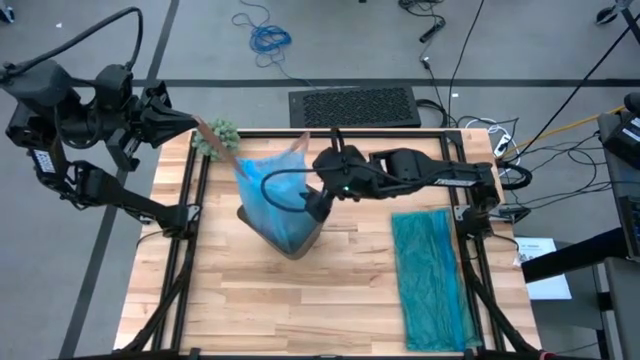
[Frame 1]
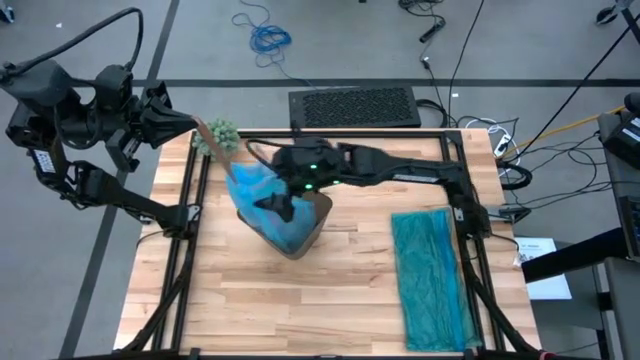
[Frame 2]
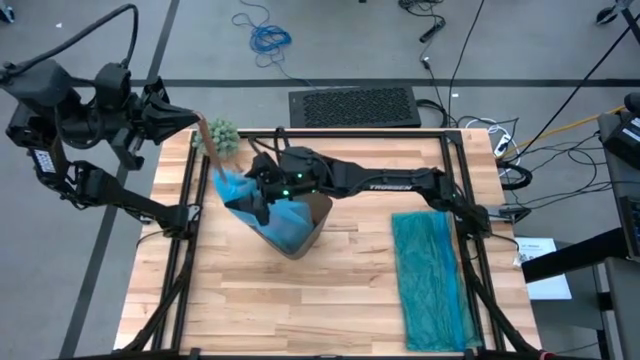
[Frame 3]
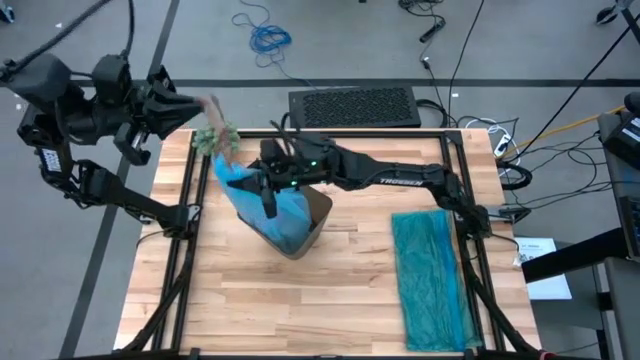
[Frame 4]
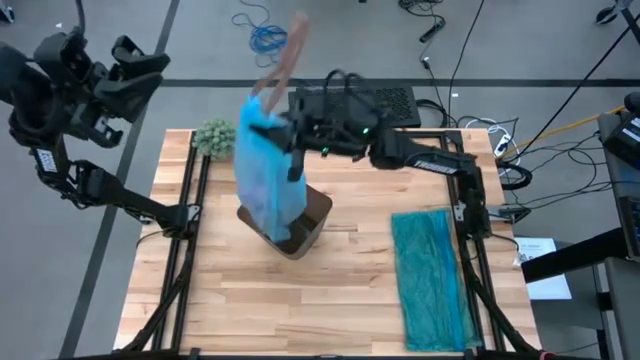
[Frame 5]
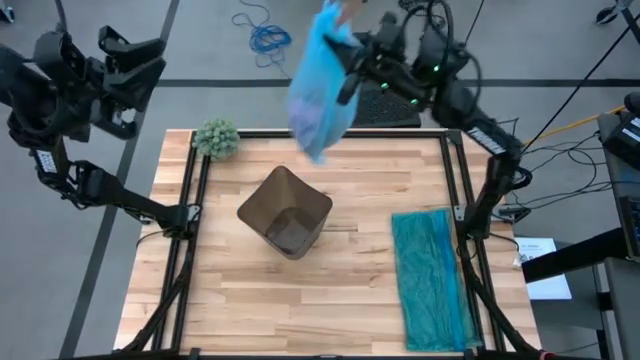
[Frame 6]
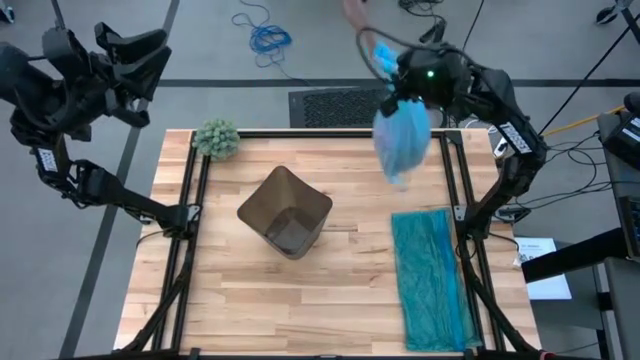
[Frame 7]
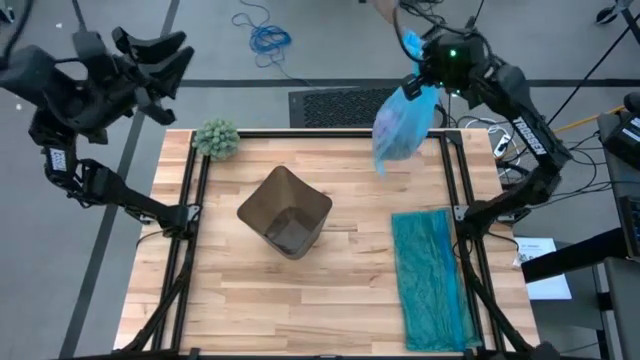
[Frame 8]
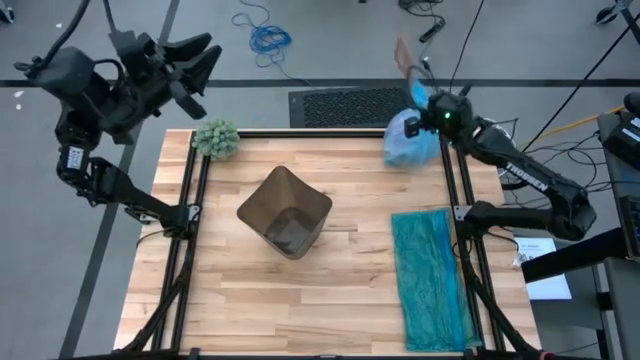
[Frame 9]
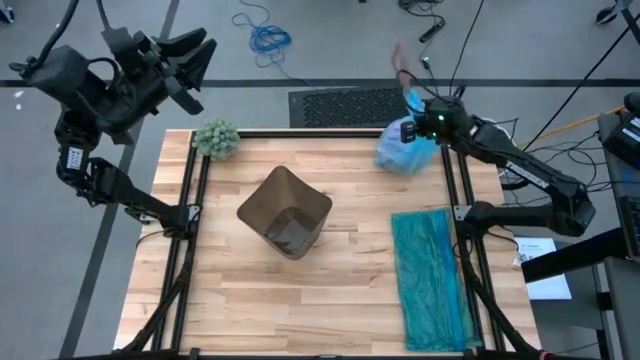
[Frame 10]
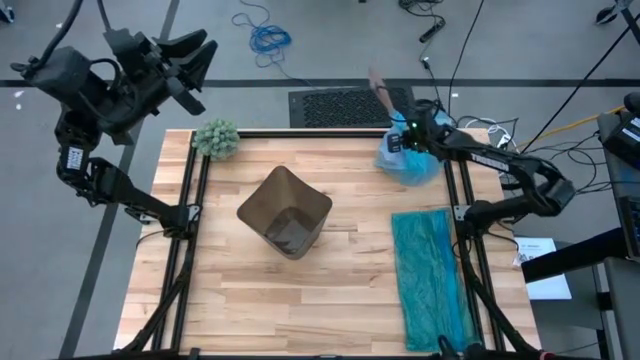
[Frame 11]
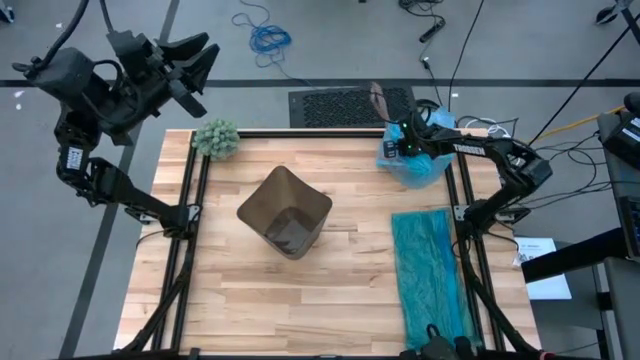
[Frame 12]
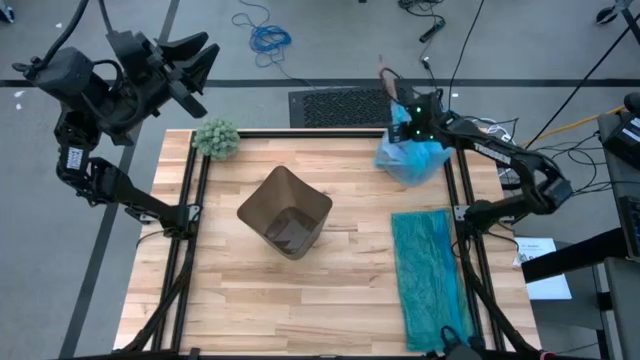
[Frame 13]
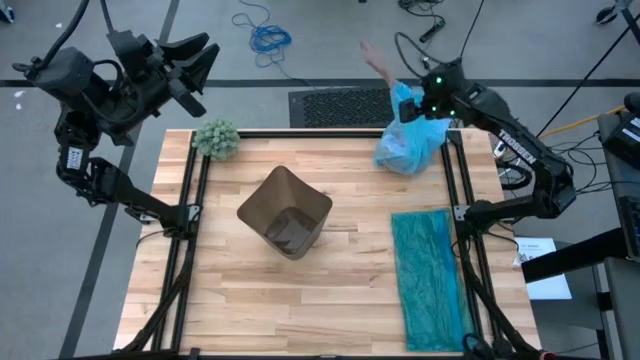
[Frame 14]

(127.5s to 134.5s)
Task: place trash/remove bag and relplace
Remove the blue trash bag from the trash bin

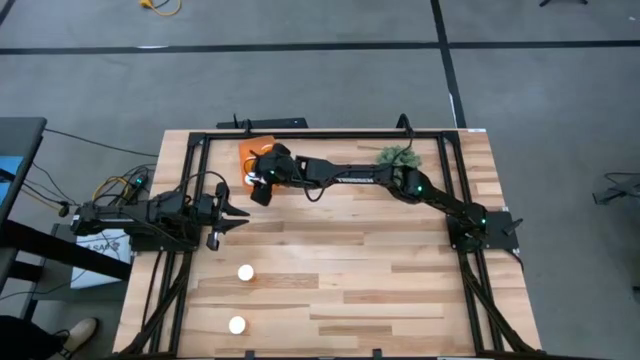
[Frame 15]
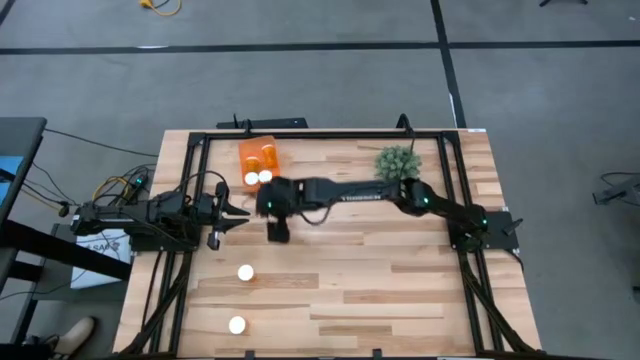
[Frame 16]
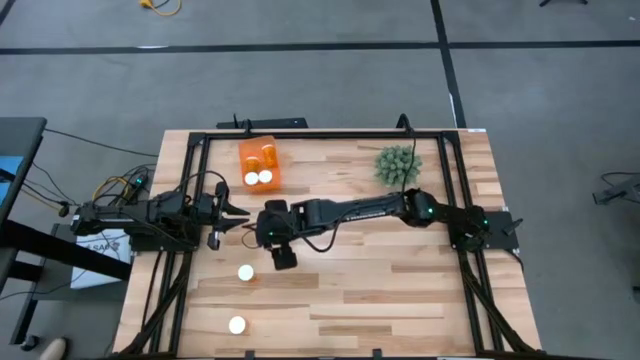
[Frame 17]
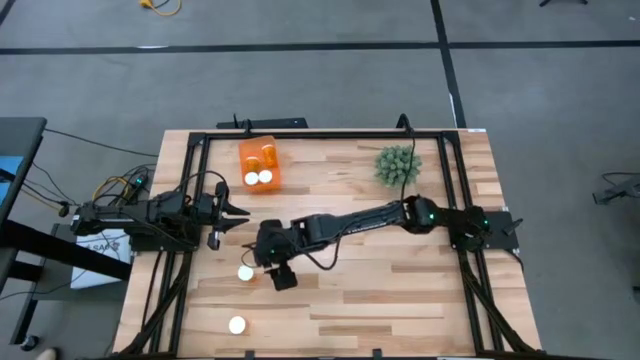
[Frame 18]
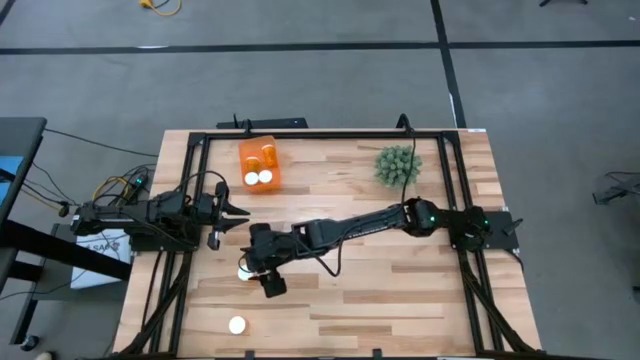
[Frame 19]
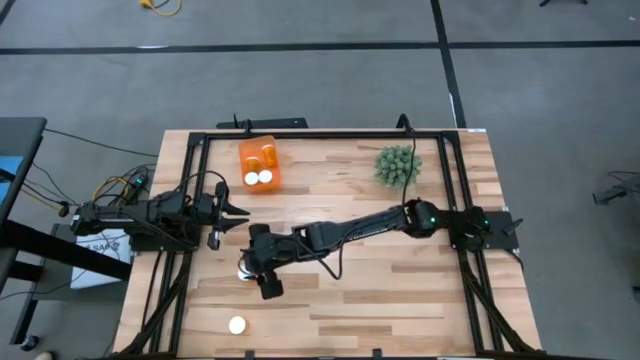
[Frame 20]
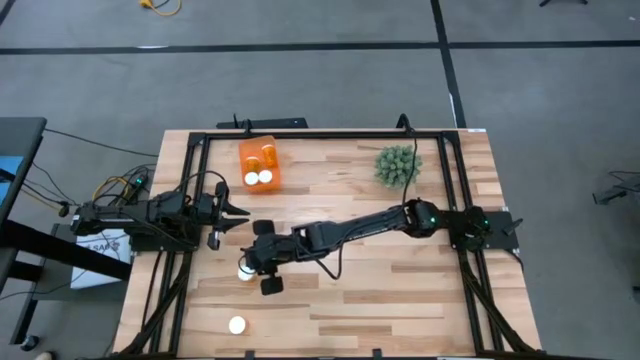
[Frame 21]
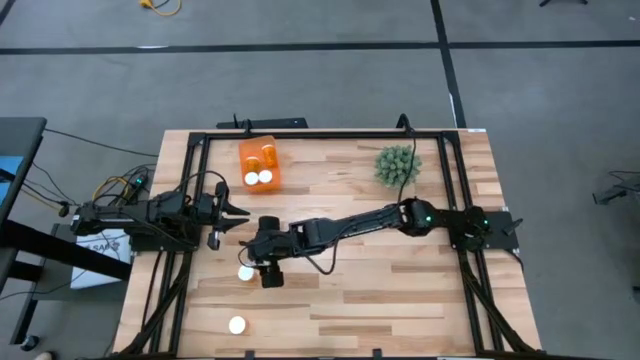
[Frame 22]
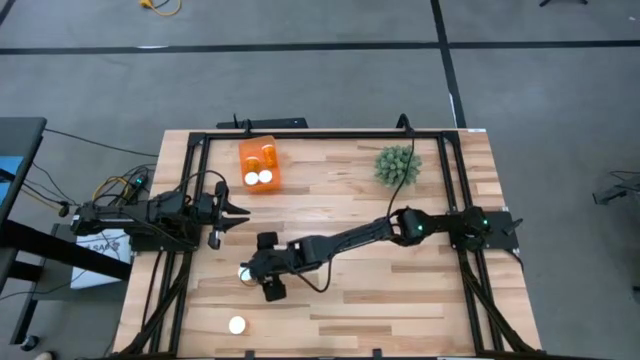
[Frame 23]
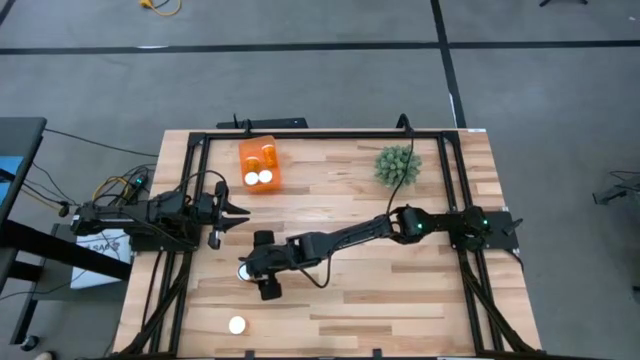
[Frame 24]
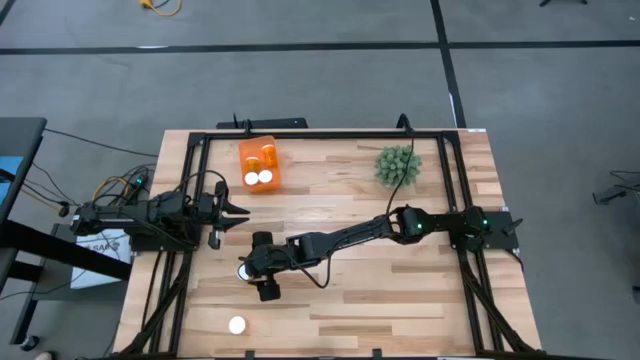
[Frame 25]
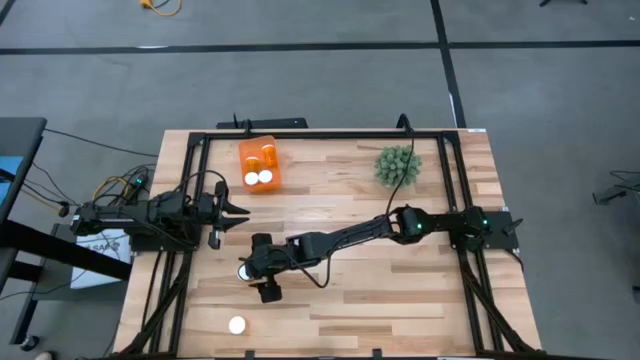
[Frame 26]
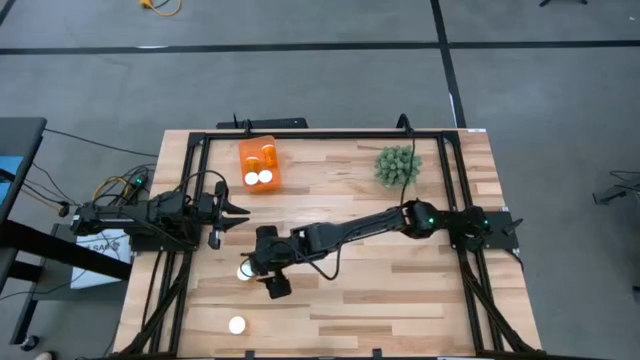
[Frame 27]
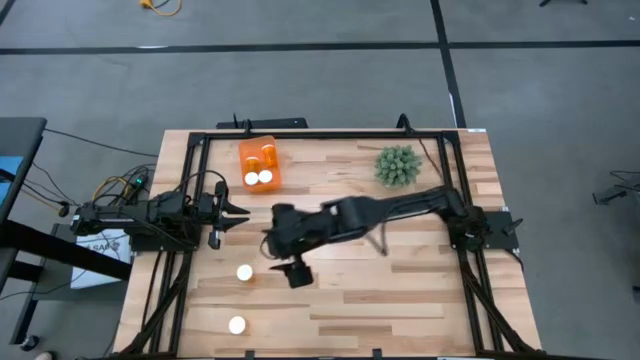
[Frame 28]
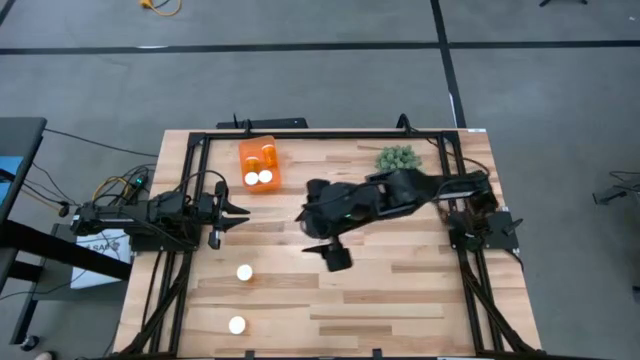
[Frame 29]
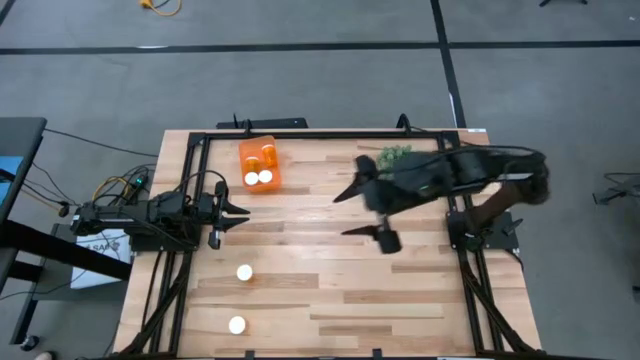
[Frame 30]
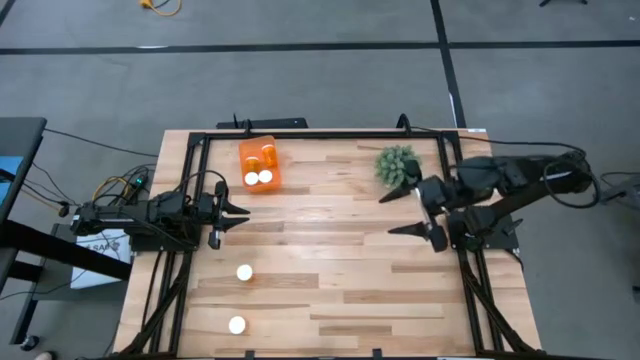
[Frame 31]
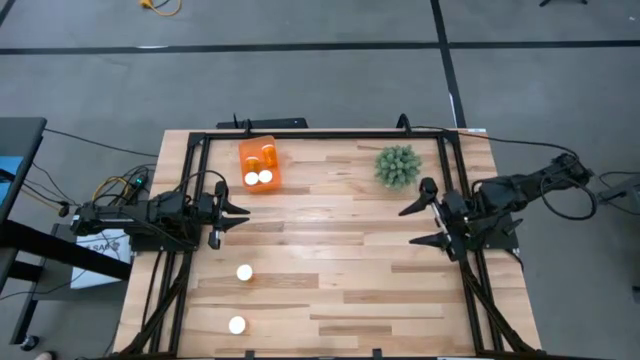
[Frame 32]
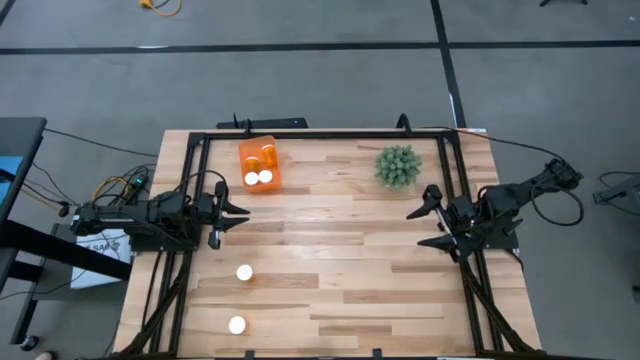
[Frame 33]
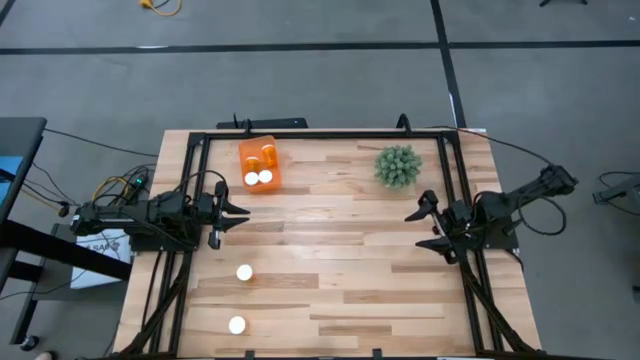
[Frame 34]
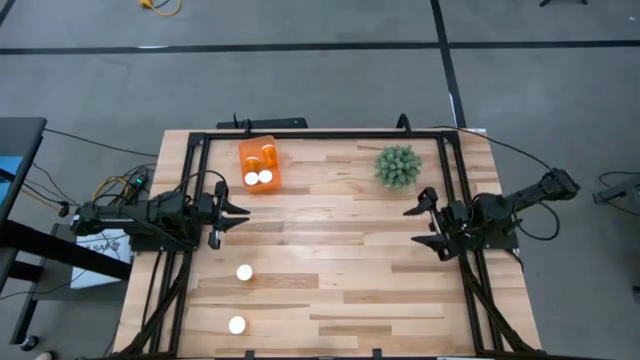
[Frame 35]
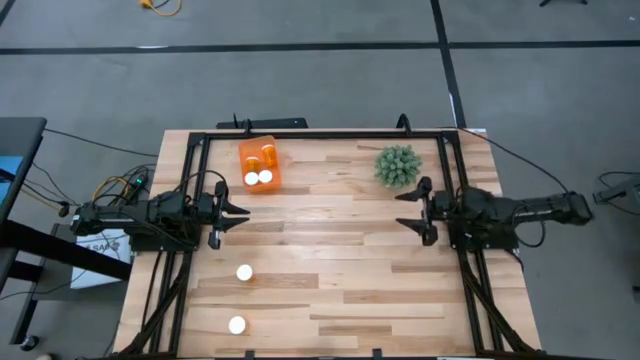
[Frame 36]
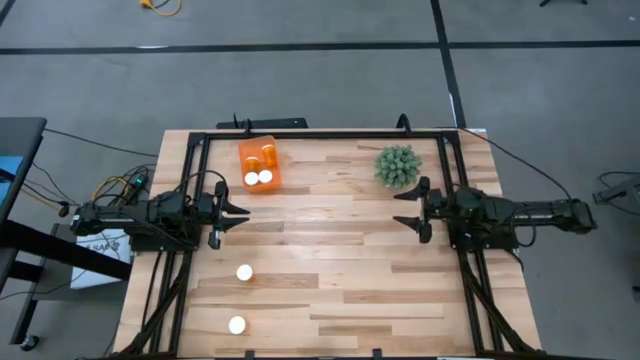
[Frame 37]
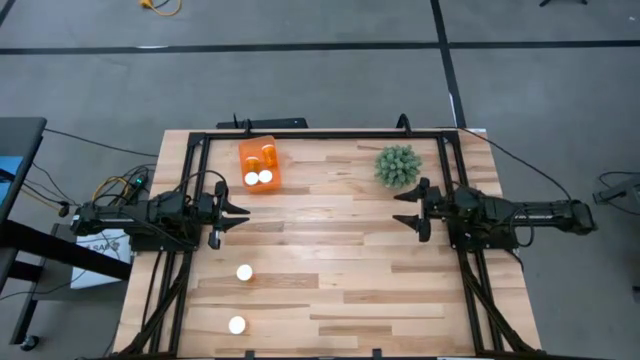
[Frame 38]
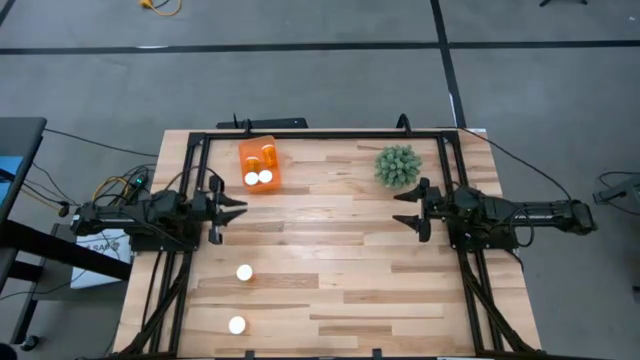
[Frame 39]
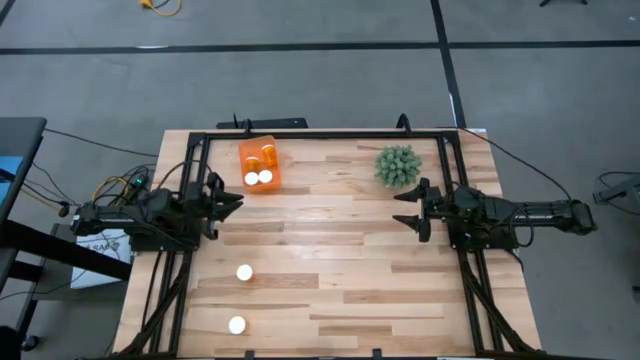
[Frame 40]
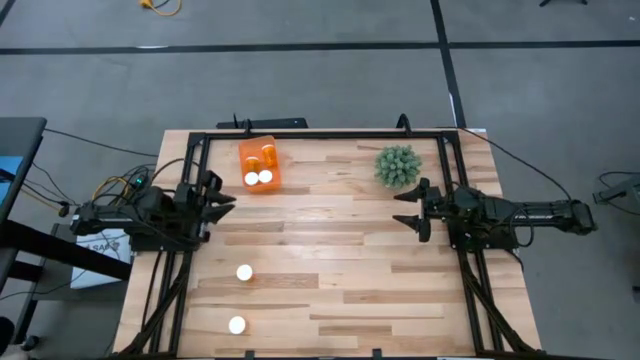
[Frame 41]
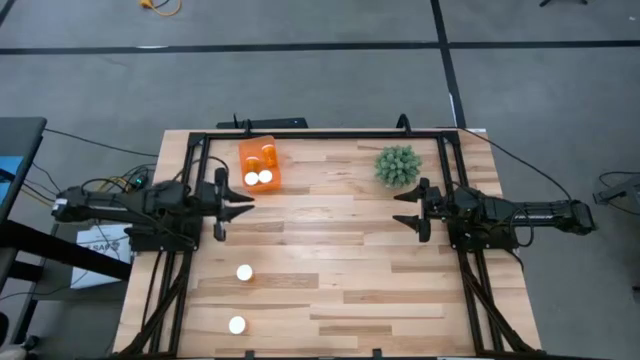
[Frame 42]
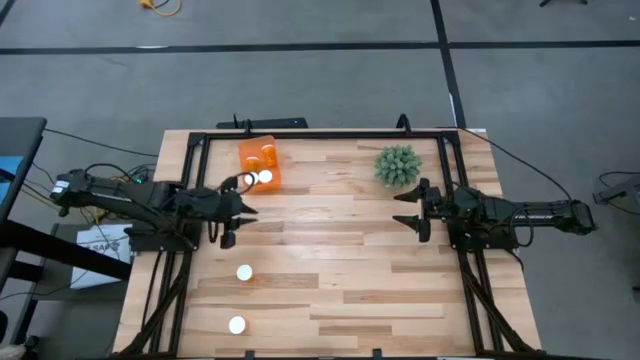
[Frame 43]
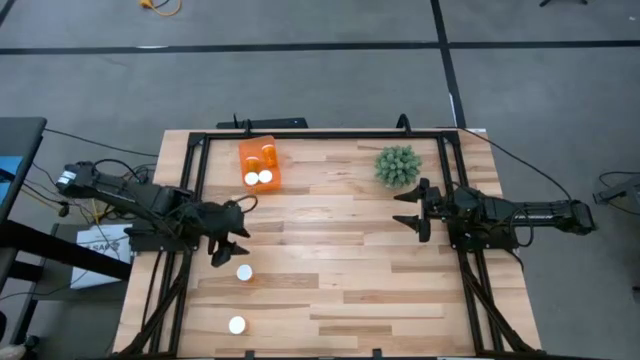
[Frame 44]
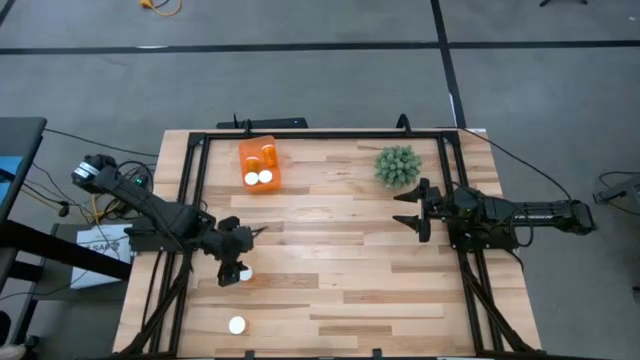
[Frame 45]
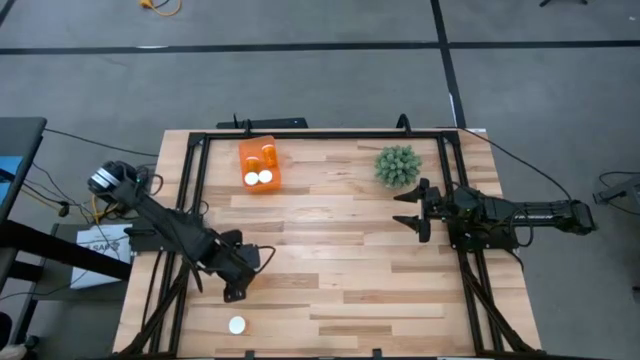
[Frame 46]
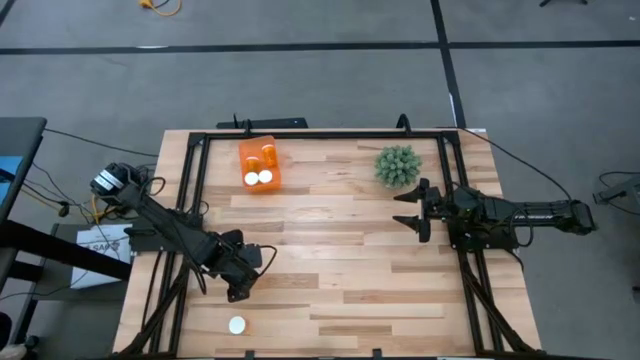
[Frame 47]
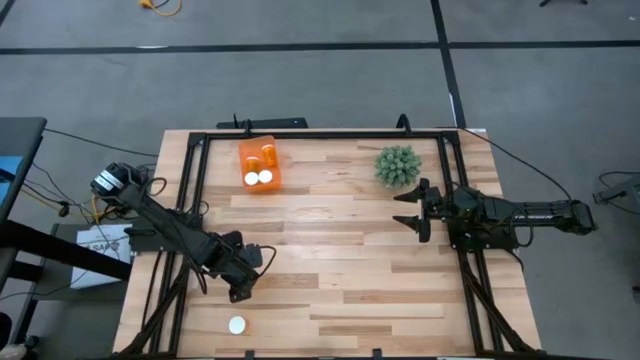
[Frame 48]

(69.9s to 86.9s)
Task: Pick and place pill bottles into a basket
Put the orange pill bottle into the orange container
